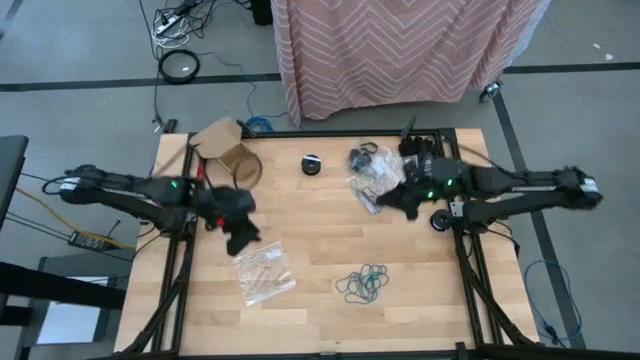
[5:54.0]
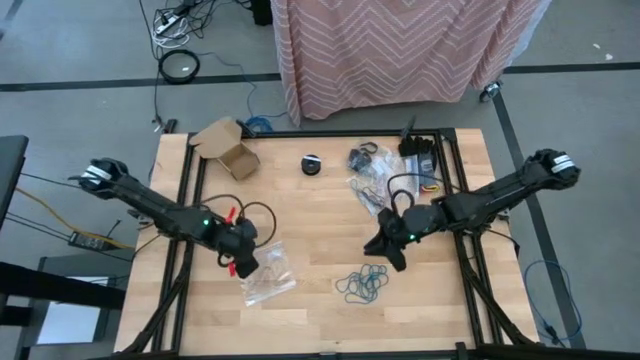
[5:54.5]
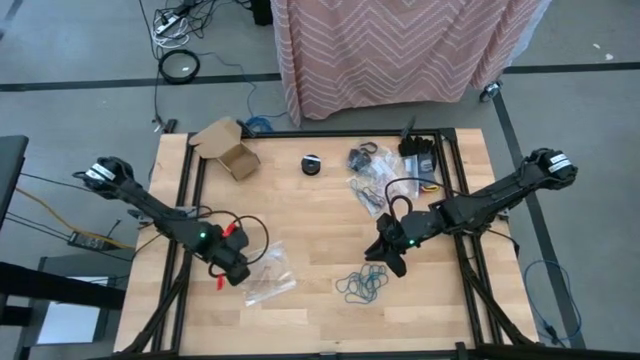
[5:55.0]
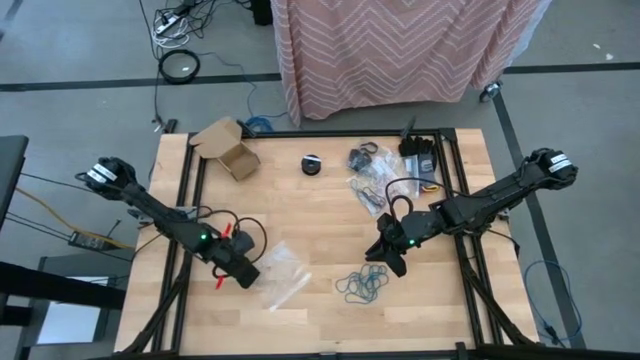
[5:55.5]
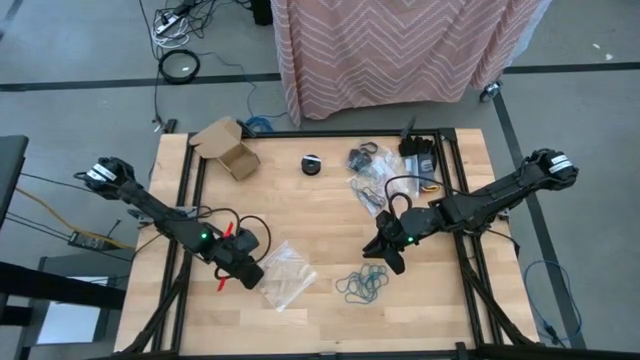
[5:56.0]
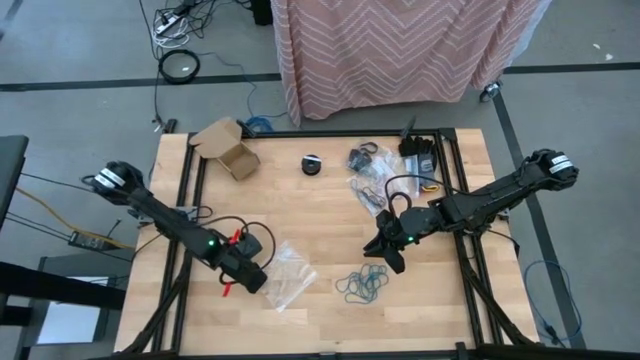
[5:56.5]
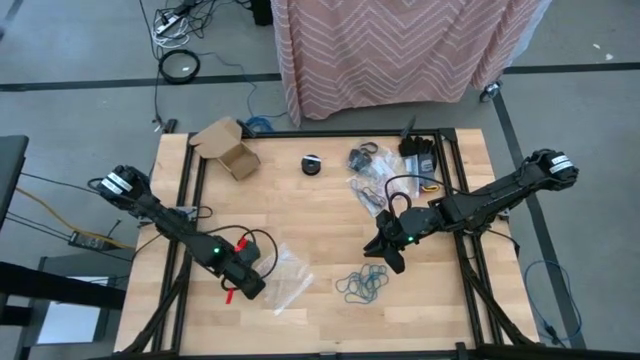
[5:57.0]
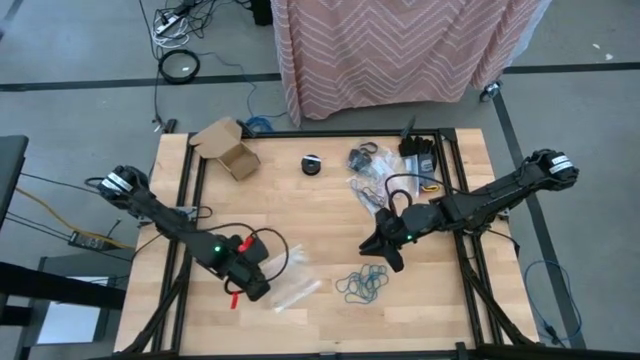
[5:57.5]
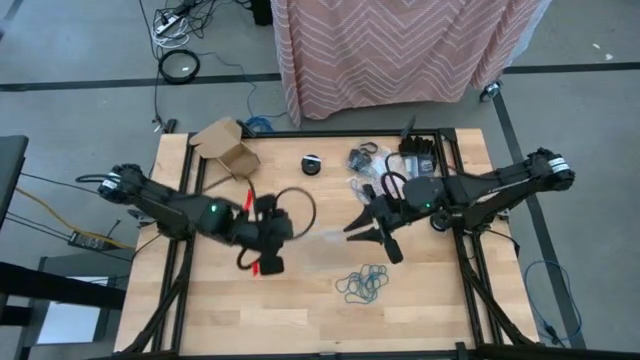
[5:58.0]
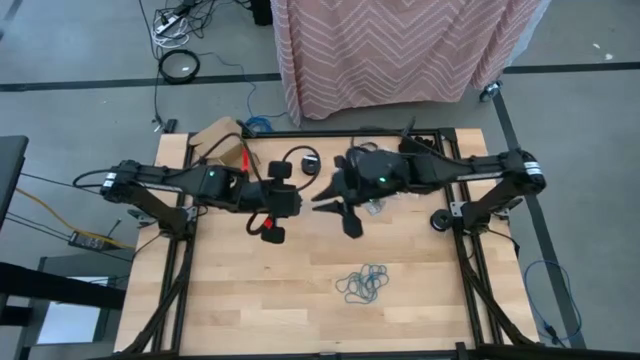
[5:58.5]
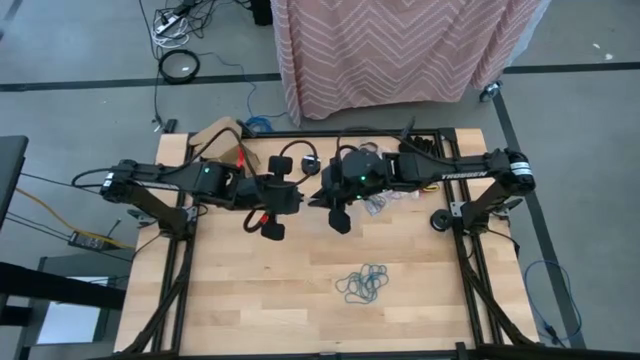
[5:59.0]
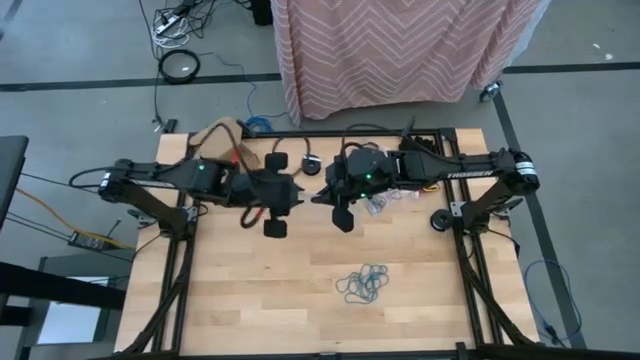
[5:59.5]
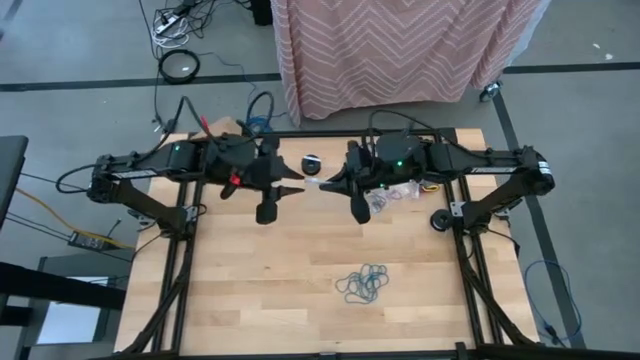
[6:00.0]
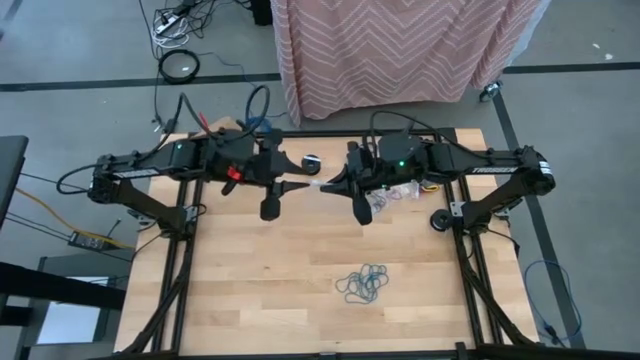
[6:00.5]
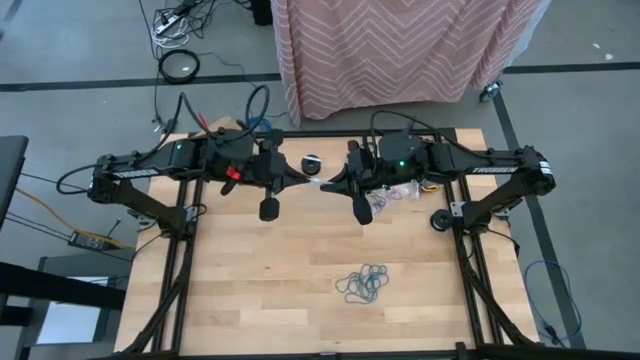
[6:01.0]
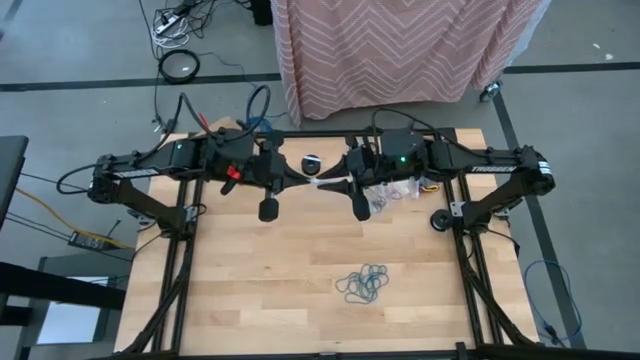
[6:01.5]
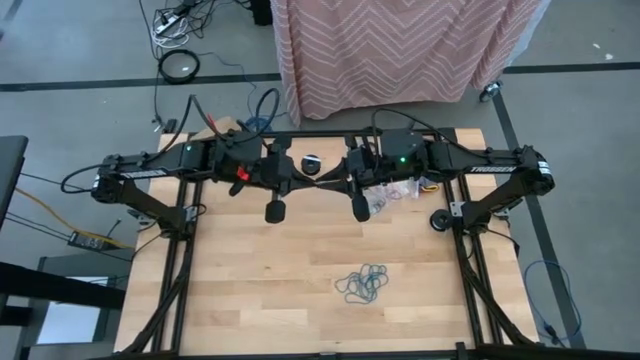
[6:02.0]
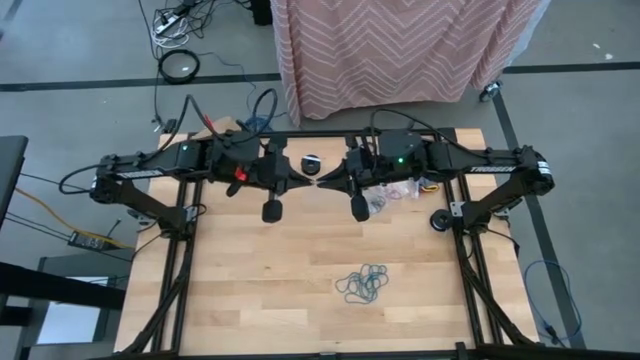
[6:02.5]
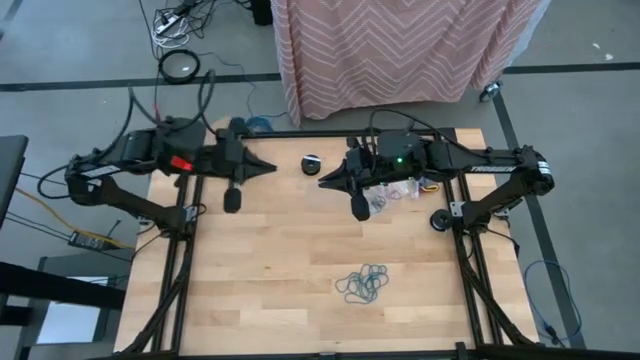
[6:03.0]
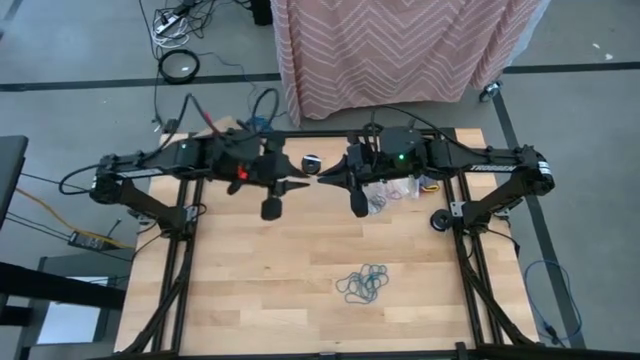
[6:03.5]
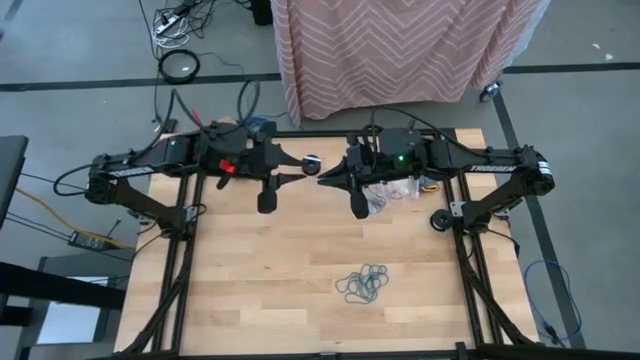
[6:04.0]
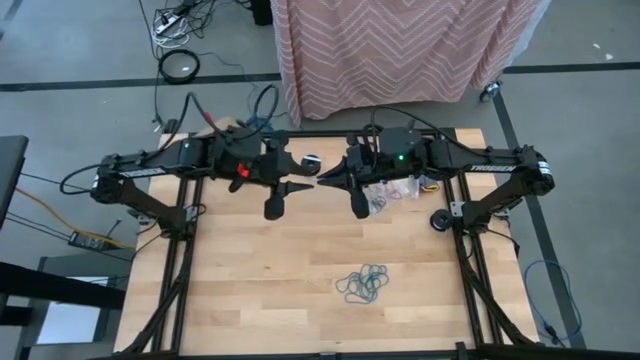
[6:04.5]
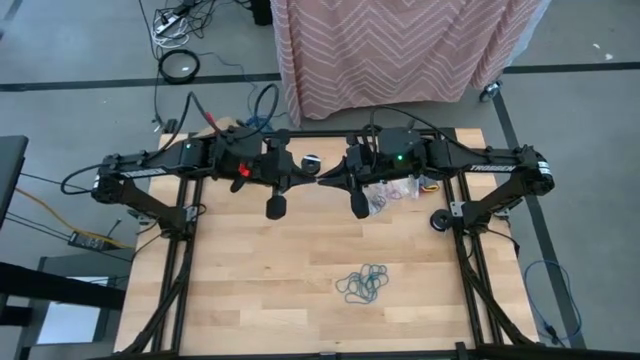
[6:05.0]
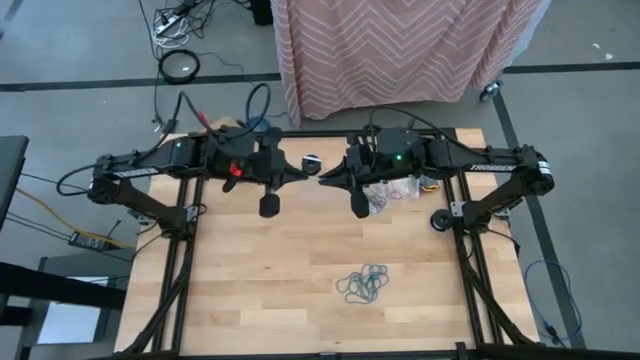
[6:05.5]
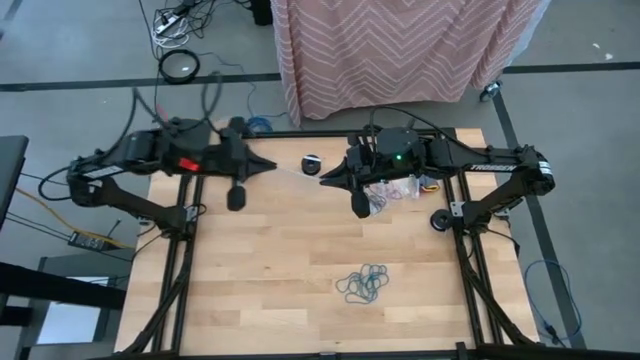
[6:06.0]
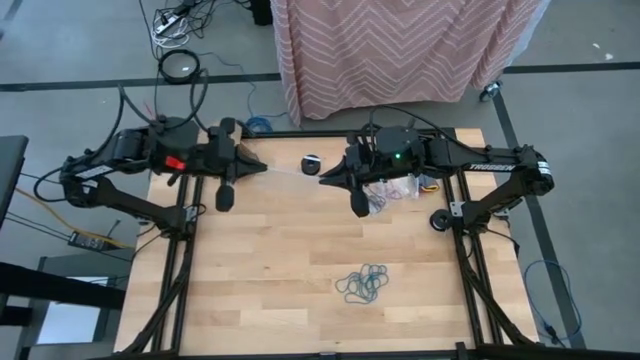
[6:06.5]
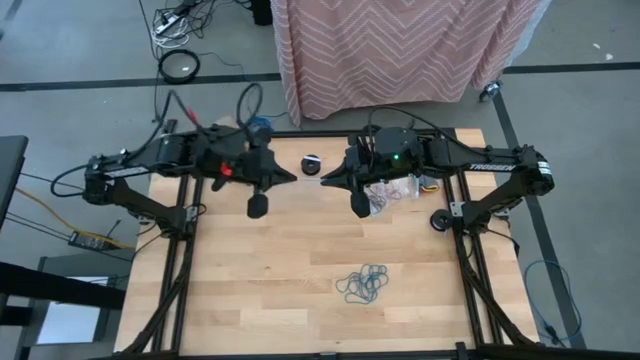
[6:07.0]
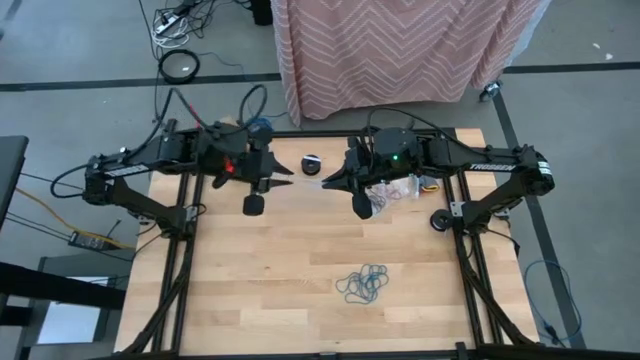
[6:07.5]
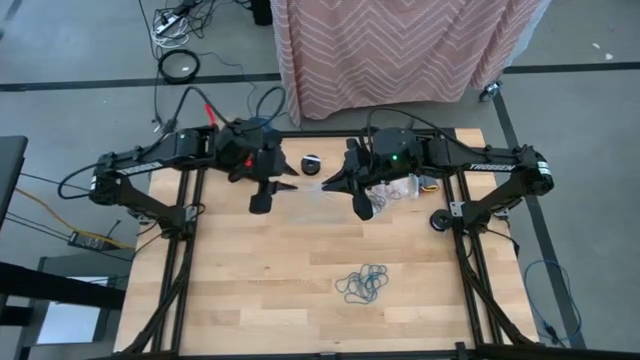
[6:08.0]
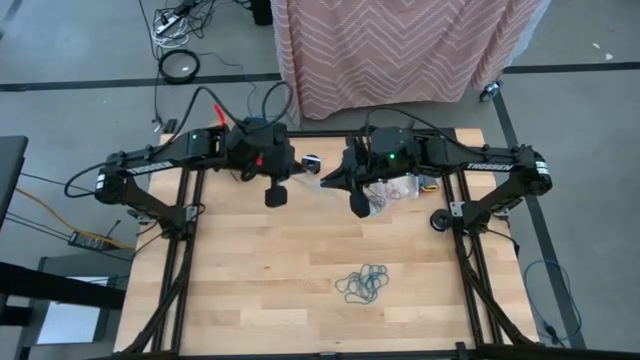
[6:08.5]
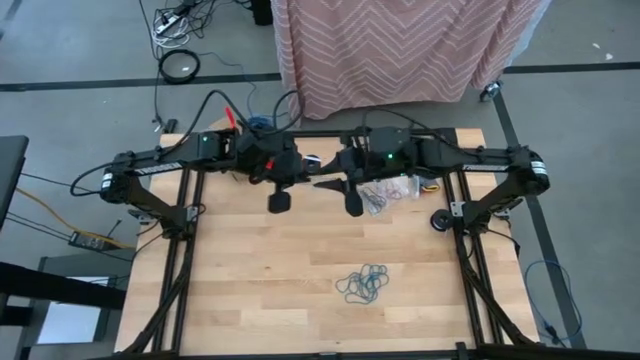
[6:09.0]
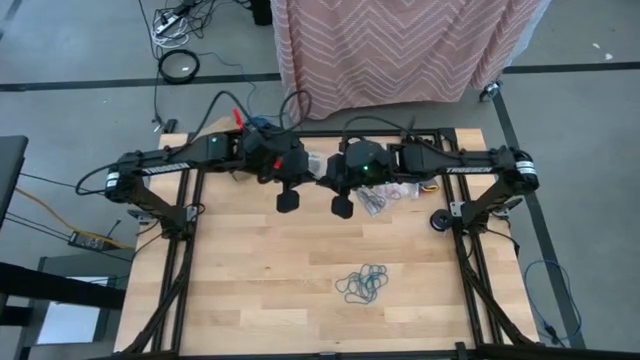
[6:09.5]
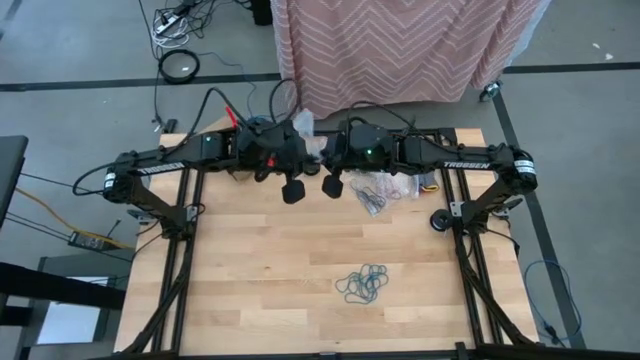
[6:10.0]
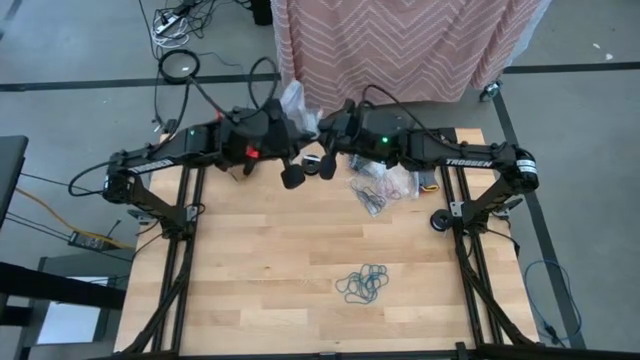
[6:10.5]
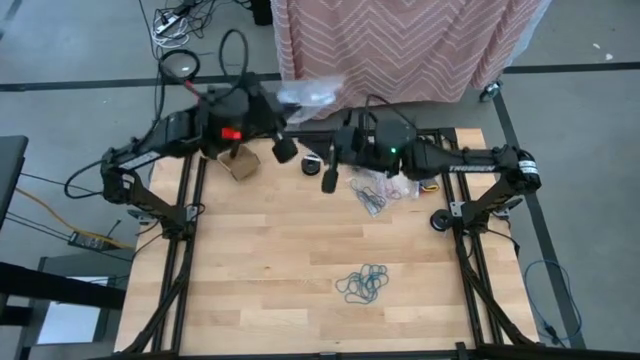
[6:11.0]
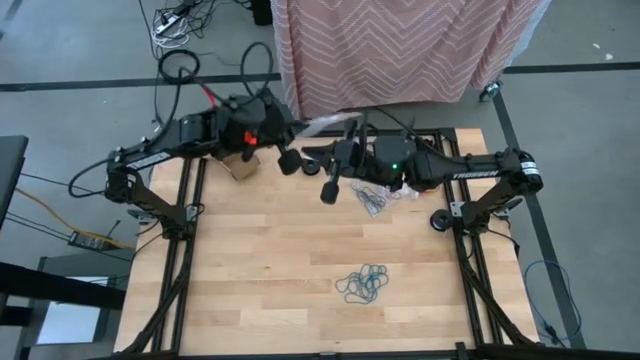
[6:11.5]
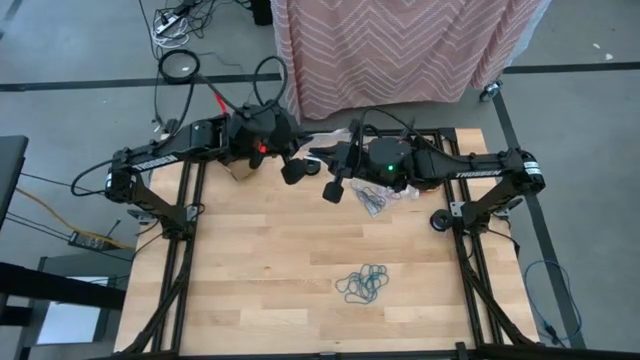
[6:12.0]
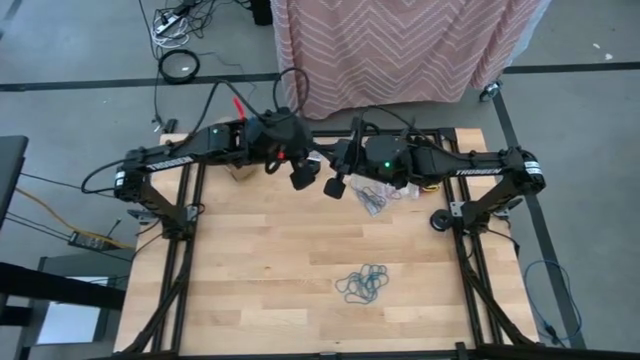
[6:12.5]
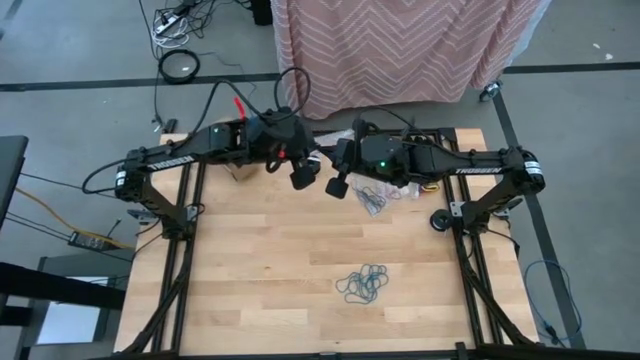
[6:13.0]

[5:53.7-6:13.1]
Task: Sort rubber bands
Open the transparent zip bag

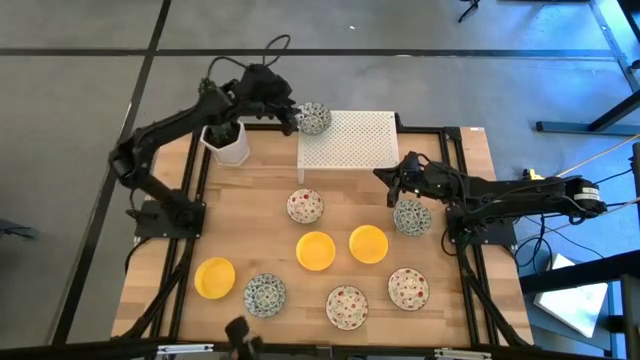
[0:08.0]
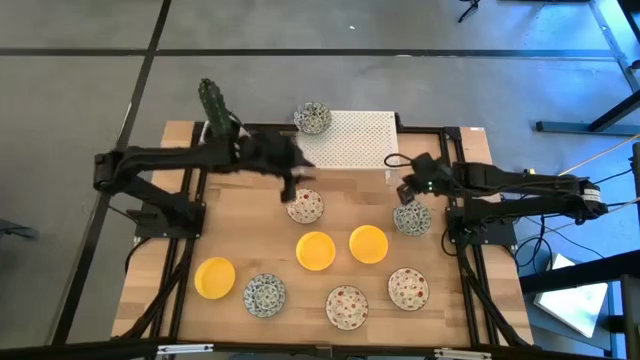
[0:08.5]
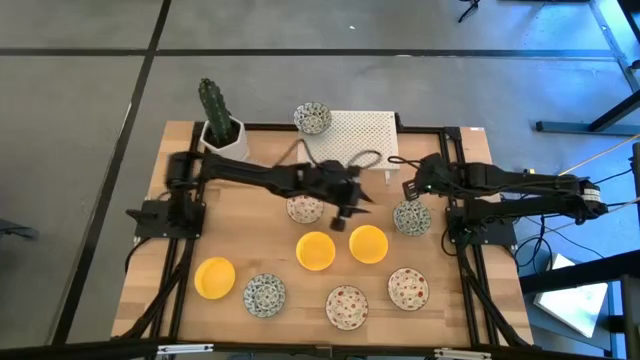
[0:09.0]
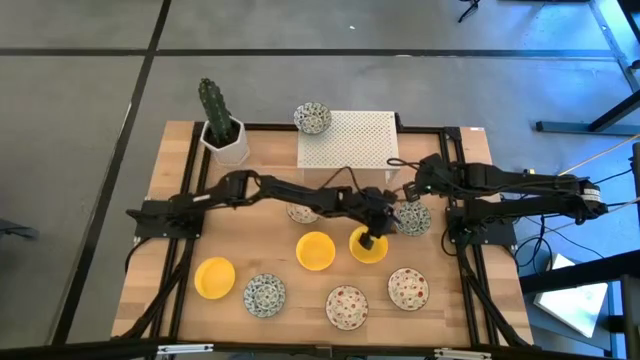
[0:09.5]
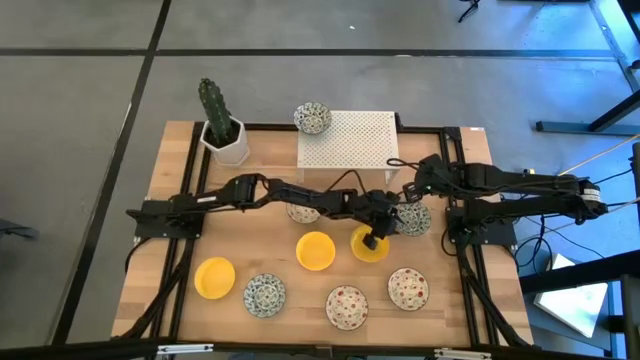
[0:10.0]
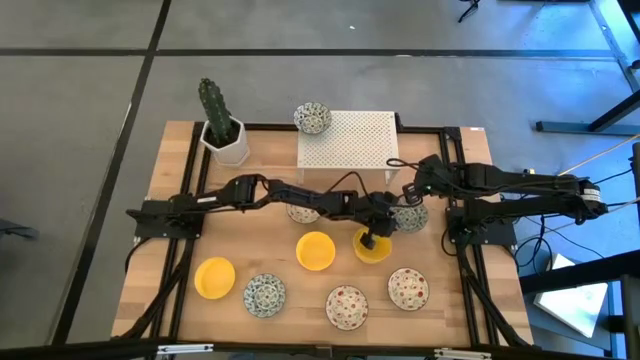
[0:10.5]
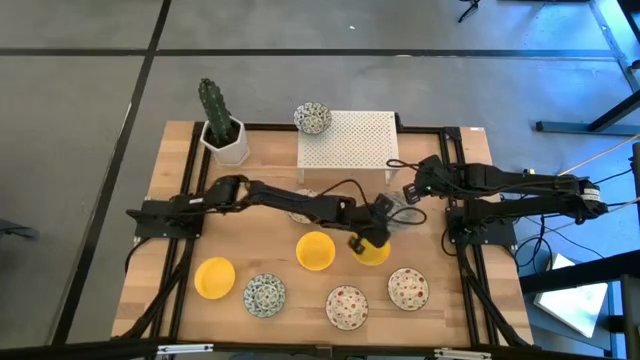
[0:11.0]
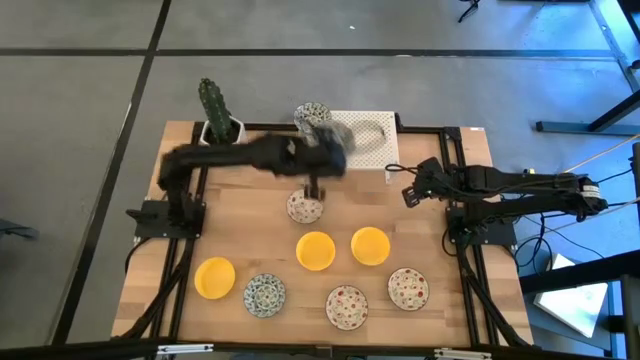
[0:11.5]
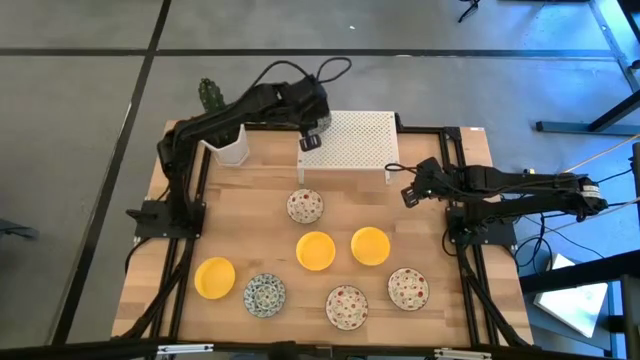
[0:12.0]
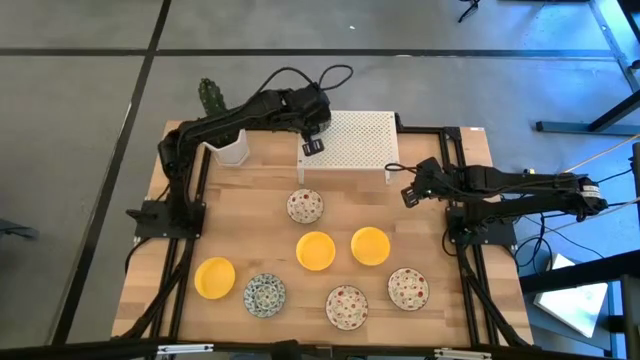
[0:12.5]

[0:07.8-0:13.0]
Task: Pick & Place Mini bowls
Stack the top blue white bowl on top of the blue white bowl on the shelf
